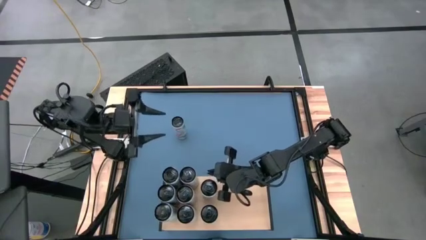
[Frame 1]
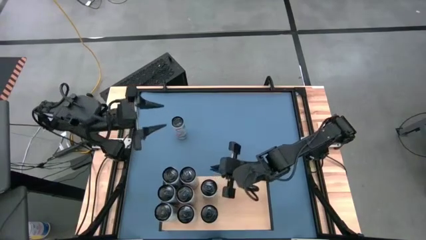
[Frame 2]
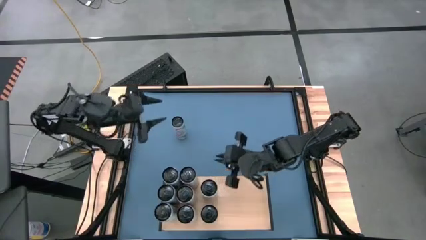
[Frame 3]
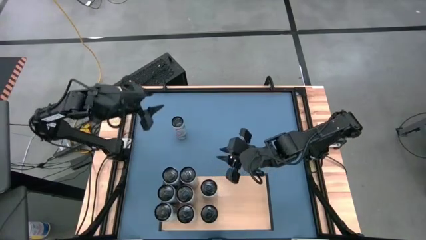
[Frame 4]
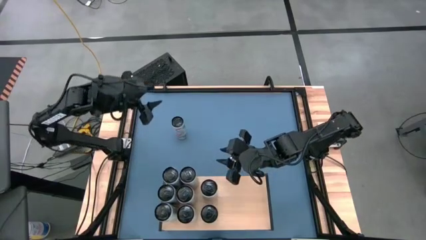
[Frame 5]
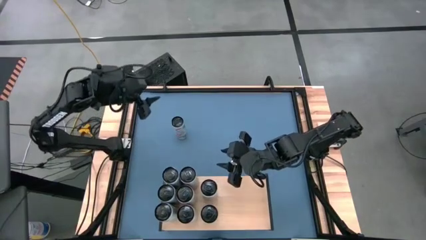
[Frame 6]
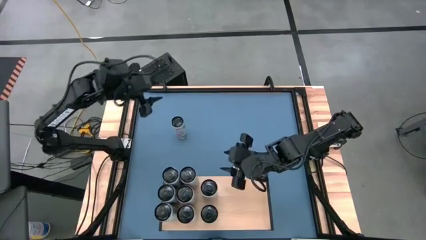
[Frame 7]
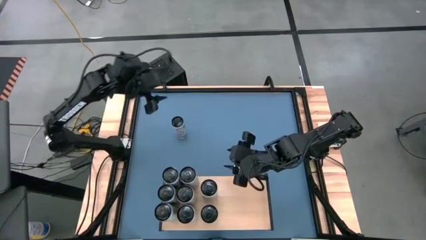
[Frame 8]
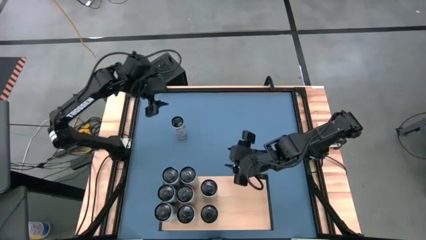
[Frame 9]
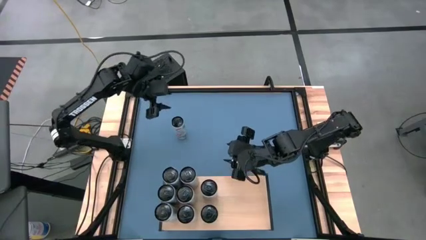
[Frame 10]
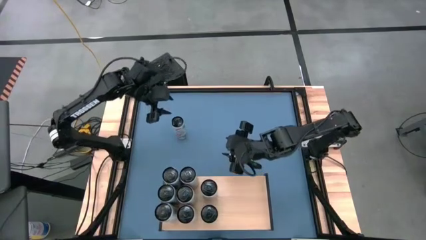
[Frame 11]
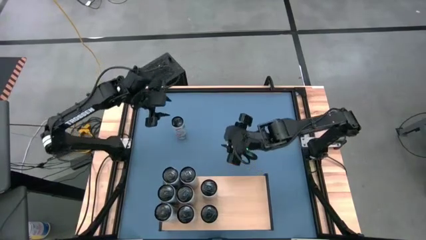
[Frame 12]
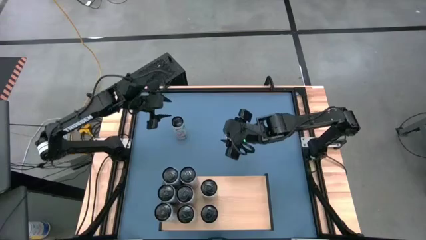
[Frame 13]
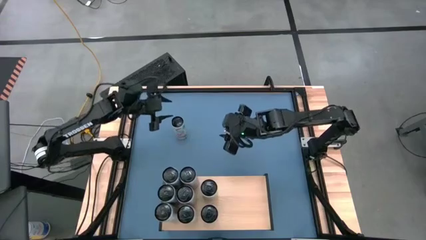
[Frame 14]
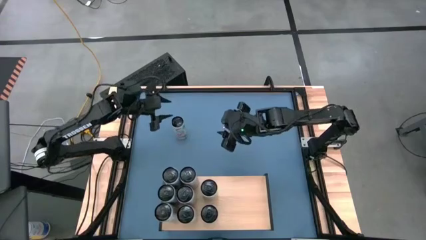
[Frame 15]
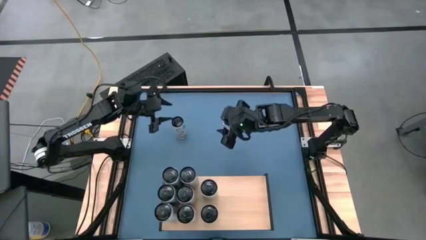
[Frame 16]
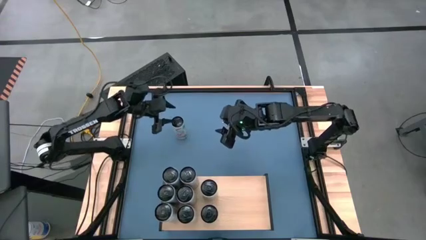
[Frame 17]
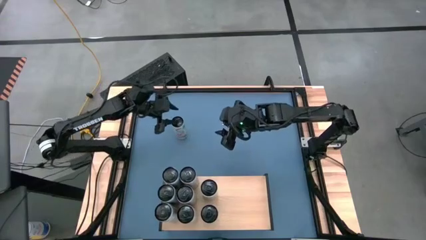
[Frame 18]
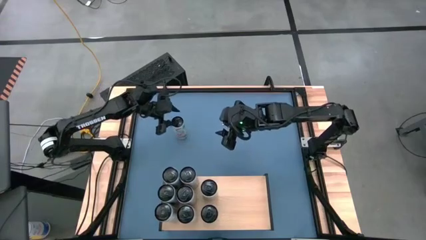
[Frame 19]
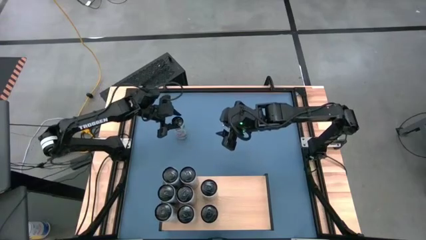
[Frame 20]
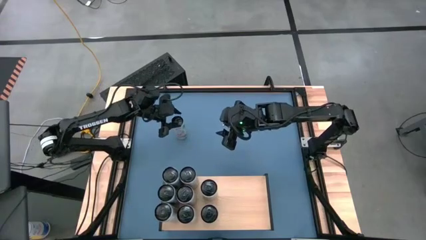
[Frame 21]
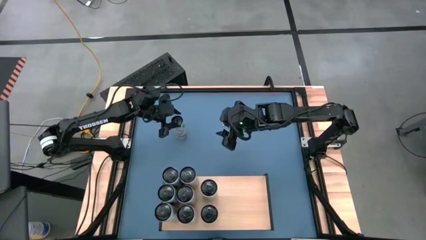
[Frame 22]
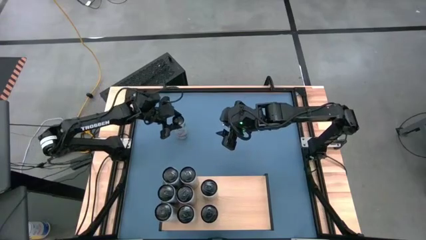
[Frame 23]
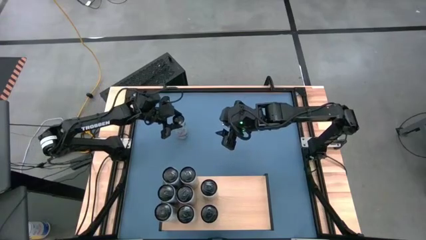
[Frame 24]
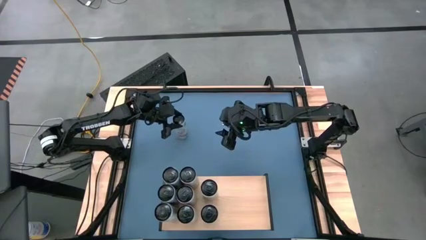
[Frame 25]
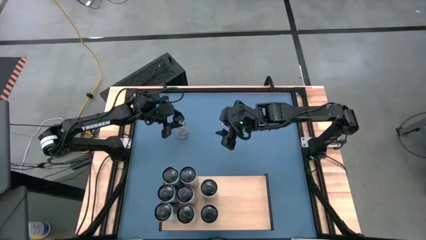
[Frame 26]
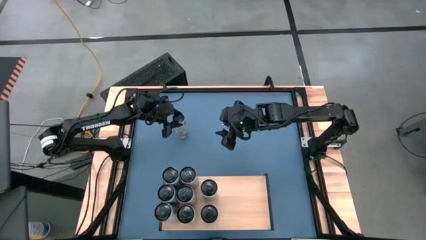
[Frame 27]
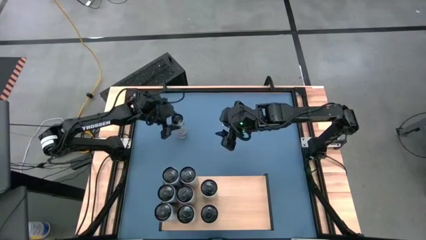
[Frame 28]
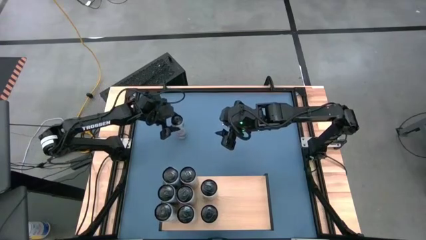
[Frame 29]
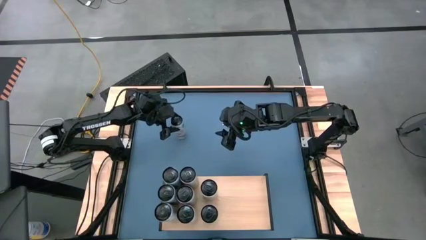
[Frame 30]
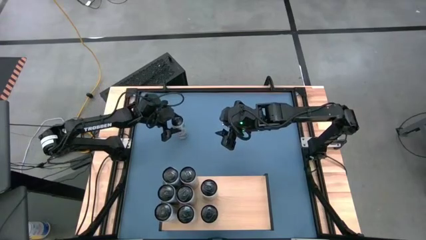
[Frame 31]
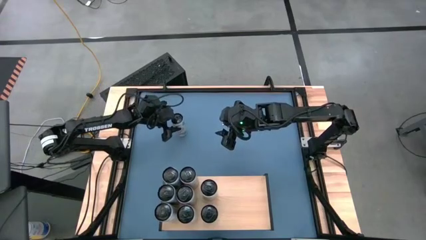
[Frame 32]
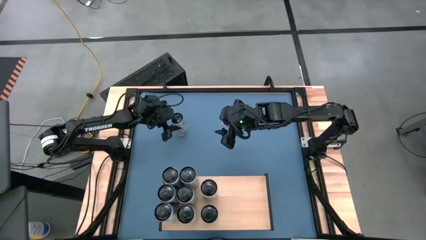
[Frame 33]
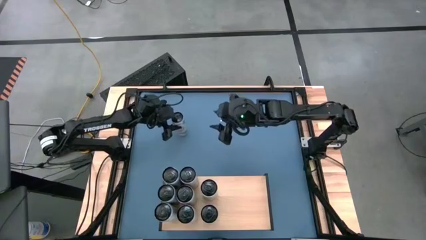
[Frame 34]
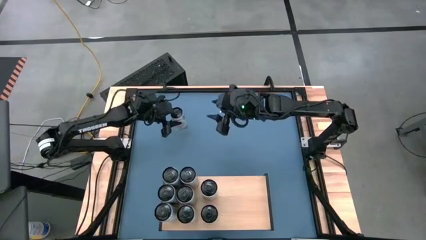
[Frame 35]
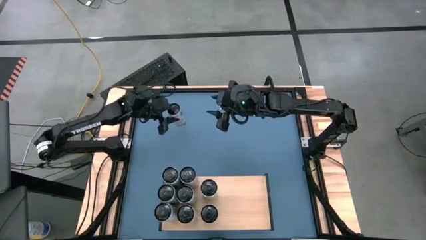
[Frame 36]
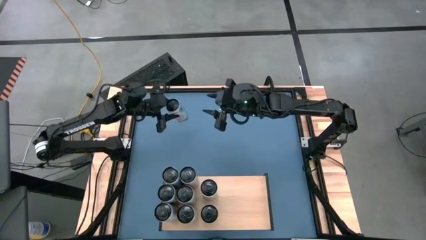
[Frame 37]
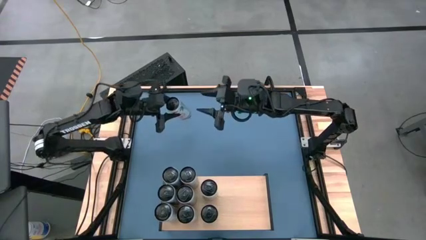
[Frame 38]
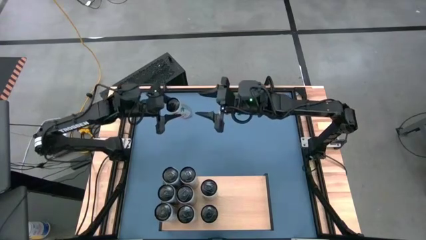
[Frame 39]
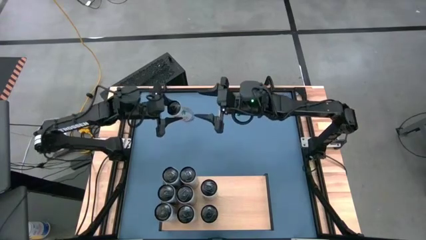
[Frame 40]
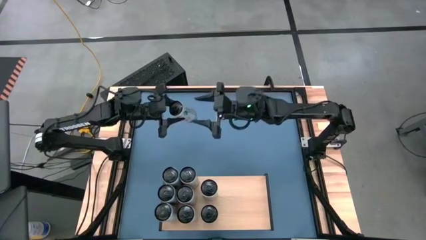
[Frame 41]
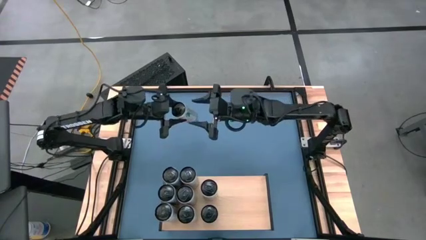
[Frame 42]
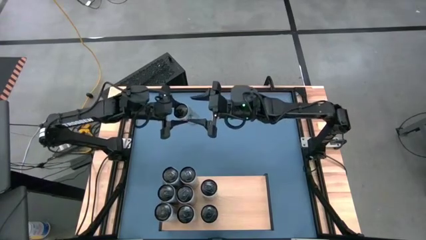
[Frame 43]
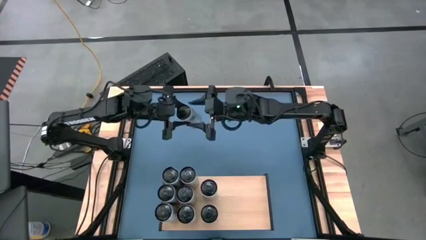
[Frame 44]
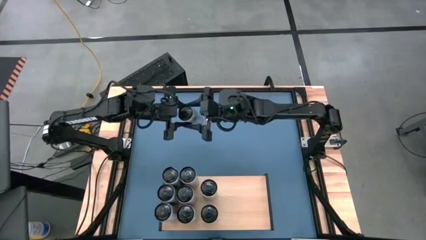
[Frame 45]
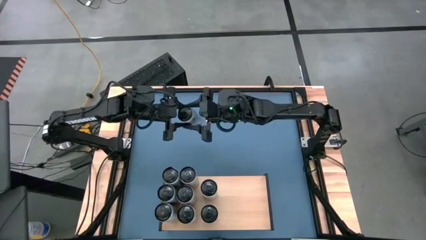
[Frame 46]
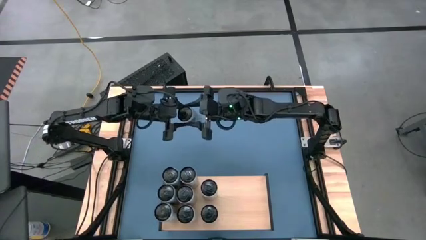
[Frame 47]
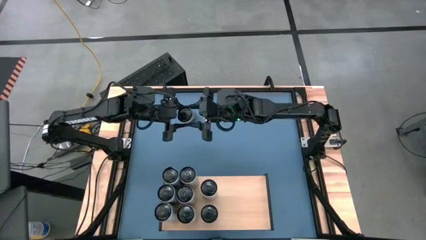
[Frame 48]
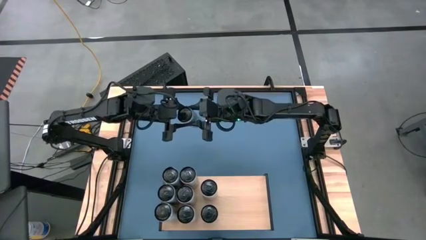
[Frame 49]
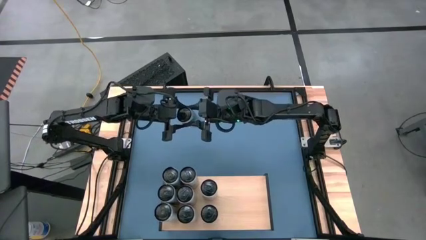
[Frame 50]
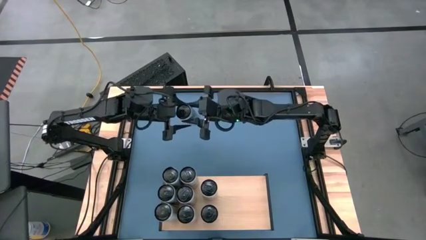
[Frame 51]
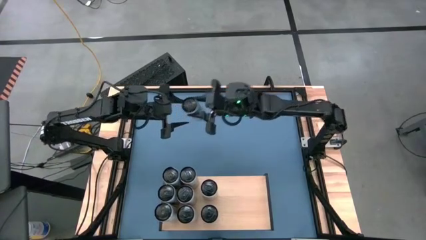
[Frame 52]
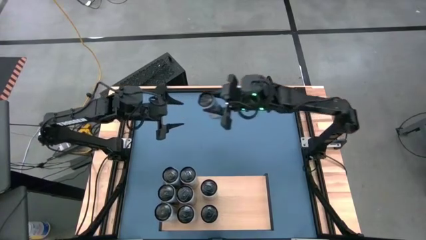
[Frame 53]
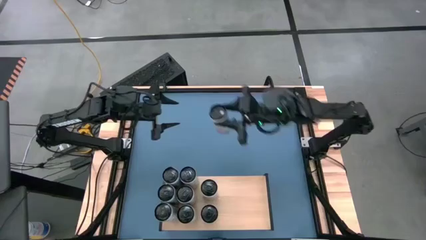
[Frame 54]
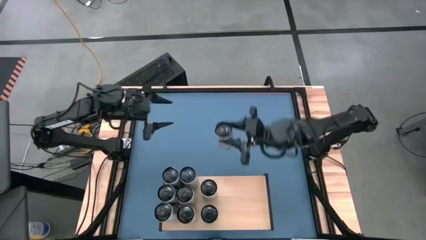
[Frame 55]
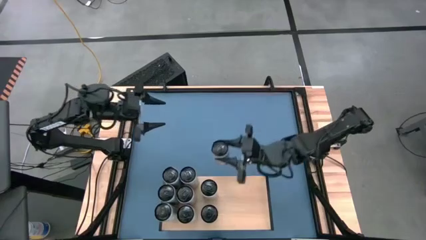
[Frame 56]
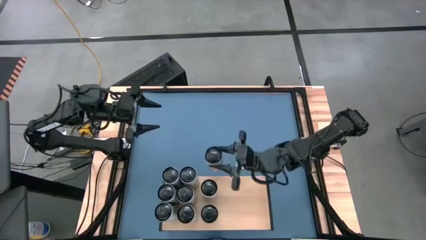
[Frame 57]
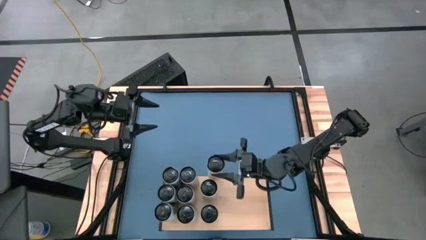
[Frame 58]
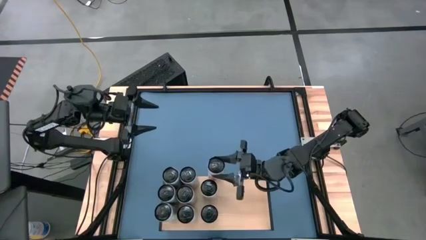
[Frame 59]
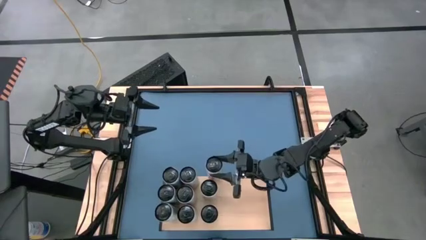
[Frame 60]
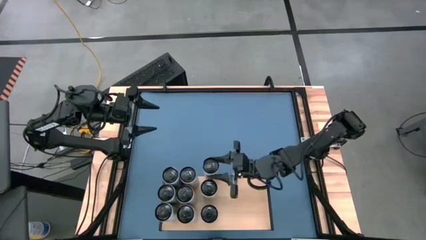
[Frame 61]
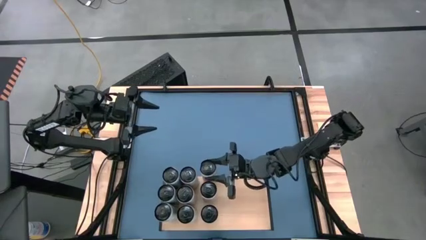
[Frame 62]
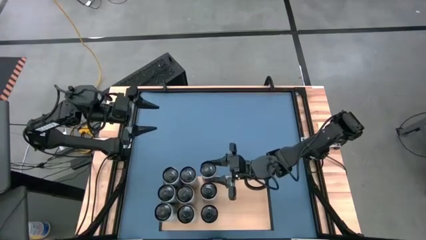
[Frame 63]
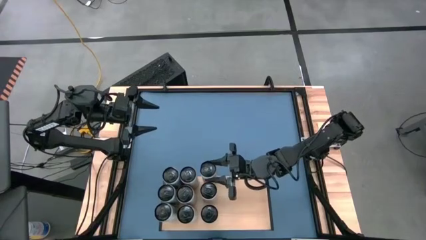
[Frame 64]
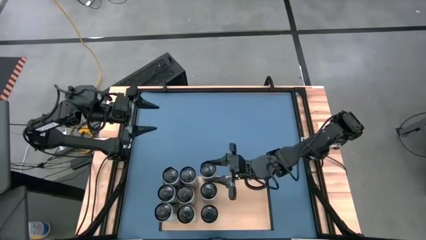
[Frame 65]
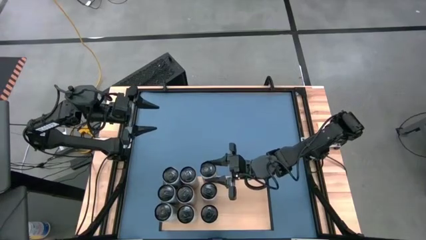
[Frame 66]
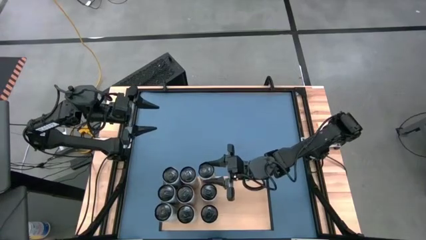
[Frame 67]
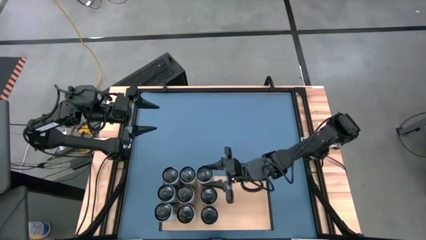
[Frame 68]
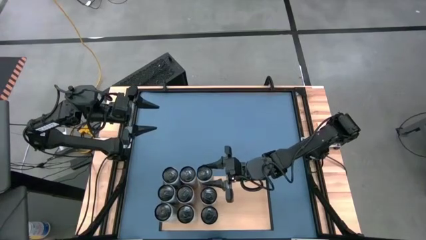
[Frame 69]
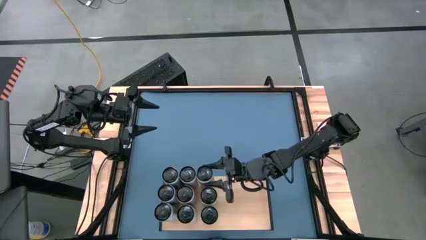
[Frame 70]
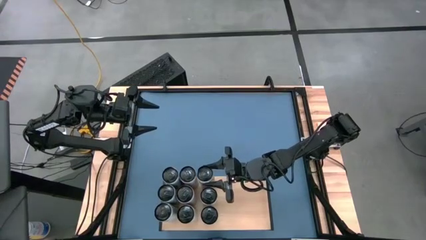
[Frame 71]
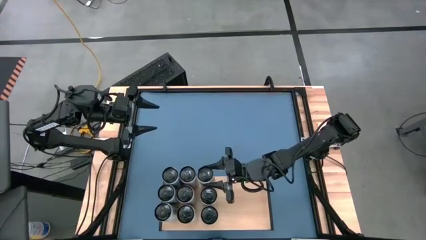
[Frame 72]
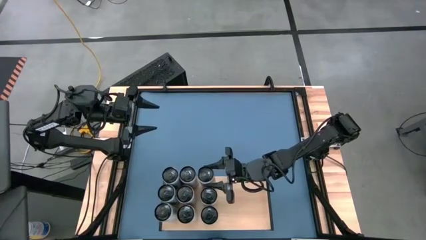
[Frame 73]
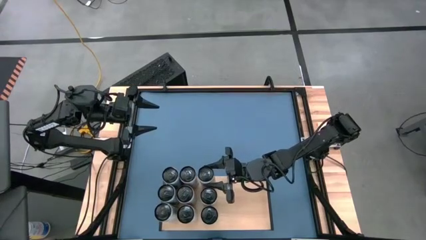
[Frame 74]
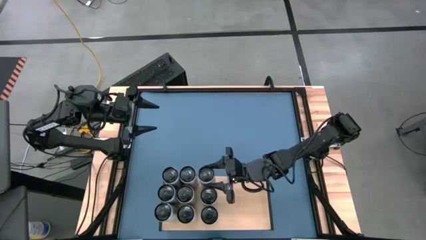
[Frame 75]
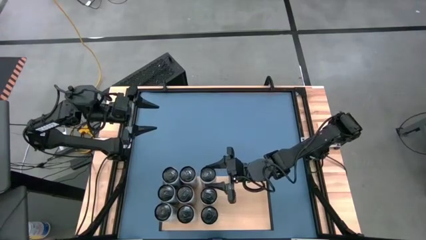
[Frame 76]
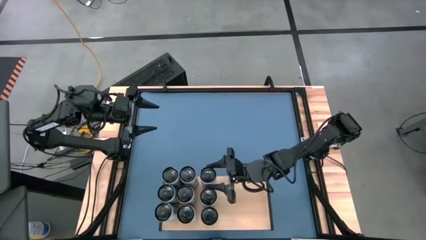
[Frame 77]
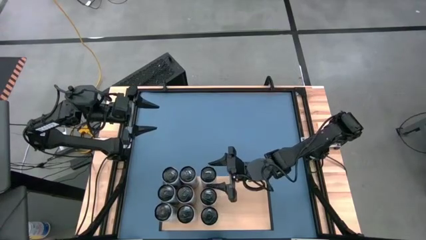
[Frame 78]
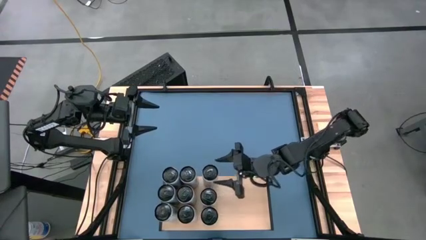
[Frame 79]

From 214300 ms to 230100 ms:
Task: Place canned beverage on shelf
Put the white pink soda can on the shelf aligned with the other white pink soda cans

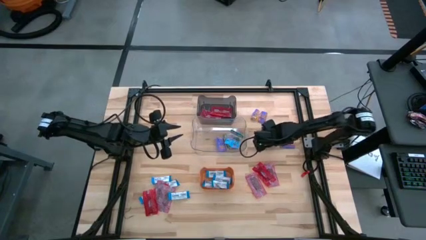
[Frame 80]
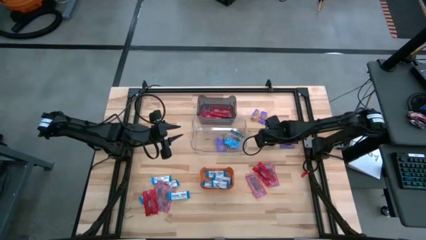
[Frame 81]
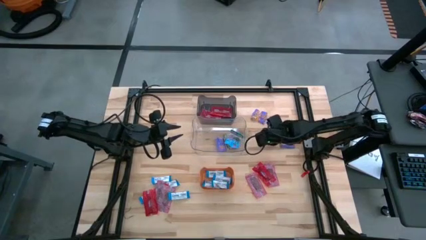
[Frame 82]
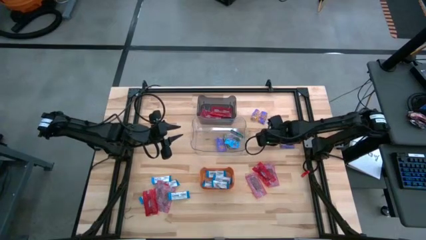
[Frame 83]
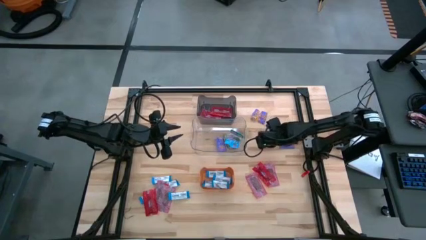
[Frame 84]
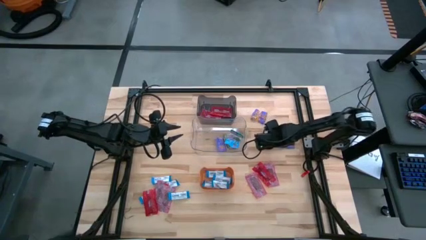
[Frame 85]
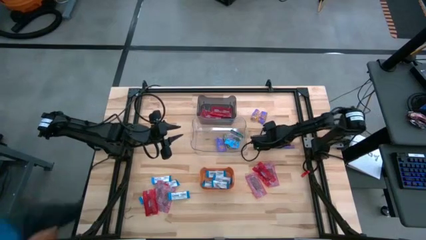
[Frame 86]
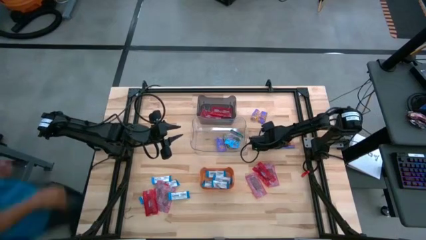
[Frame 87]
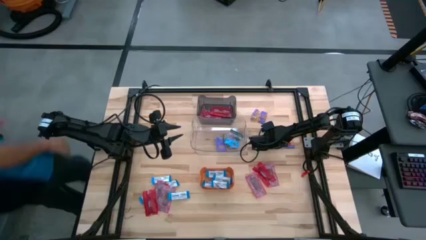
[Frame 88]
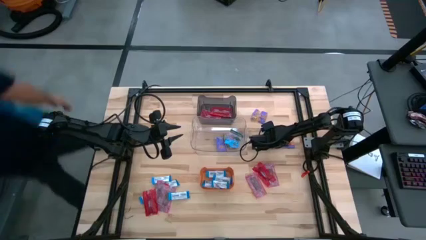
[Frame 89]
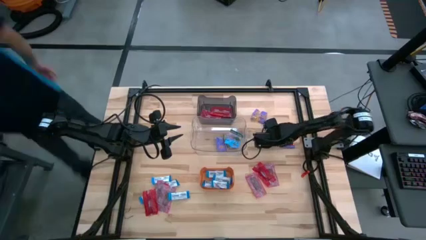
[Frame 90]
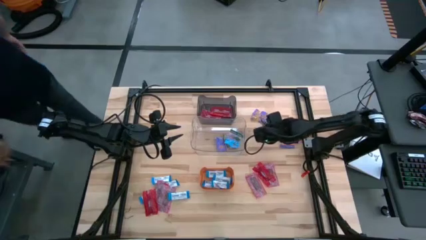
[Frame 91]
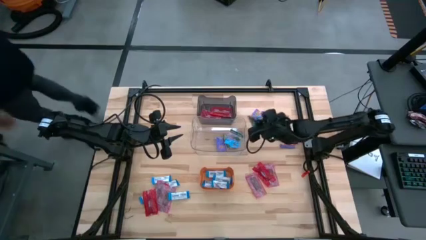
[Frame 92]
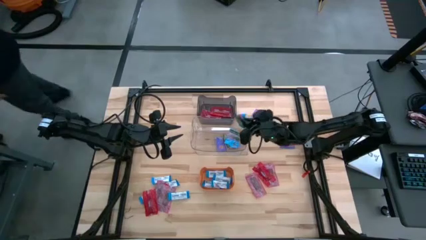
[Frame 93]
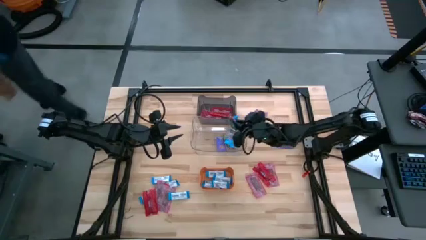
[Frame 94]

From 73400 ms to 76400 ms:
Task: Sort candy
Put the blue candy into the clear transparent bin
